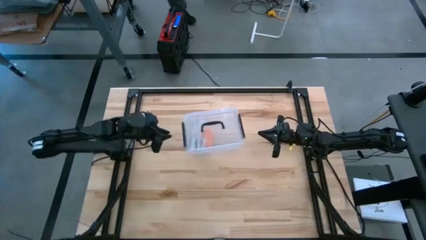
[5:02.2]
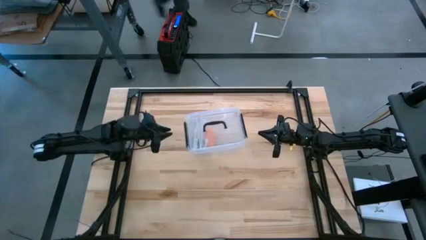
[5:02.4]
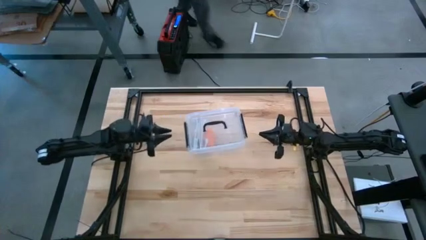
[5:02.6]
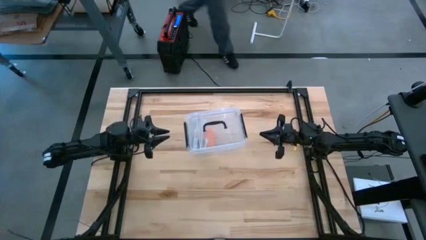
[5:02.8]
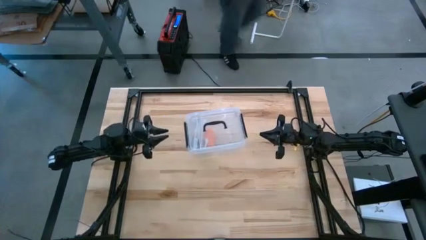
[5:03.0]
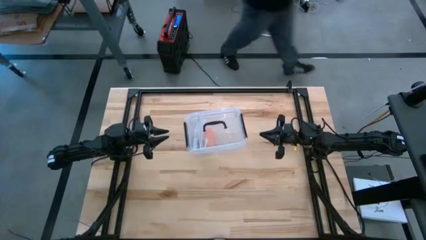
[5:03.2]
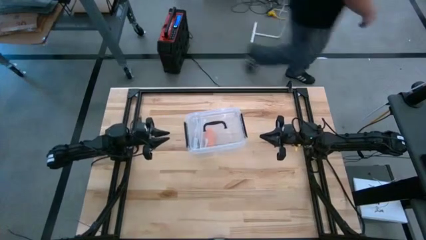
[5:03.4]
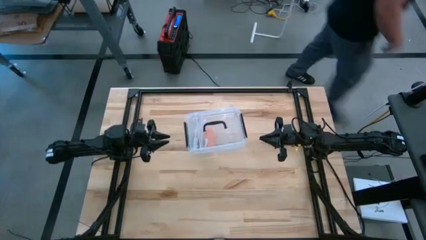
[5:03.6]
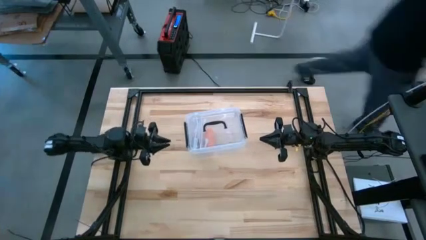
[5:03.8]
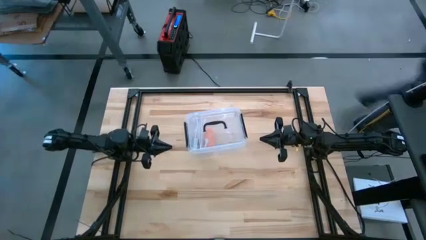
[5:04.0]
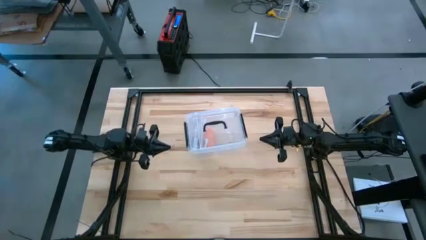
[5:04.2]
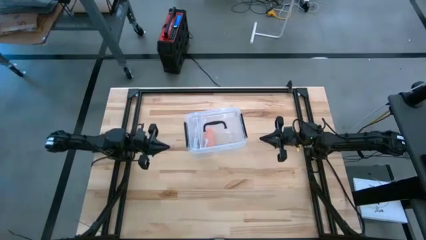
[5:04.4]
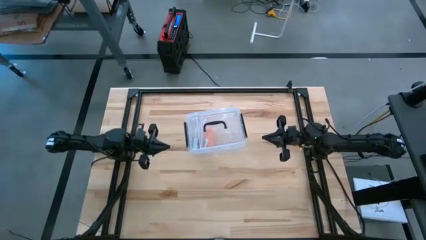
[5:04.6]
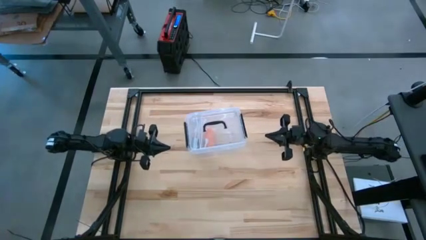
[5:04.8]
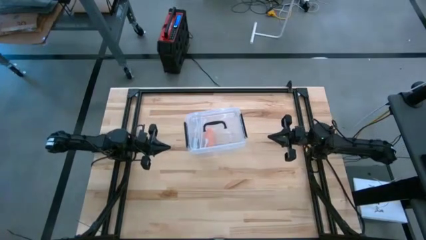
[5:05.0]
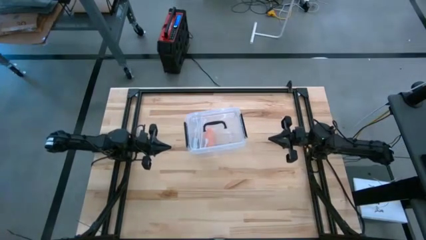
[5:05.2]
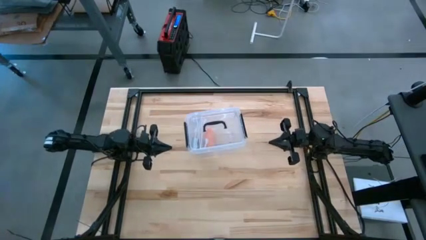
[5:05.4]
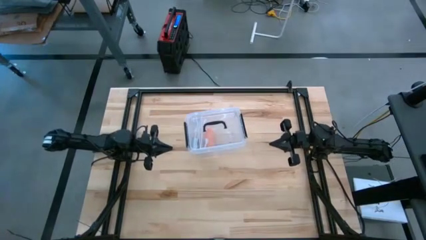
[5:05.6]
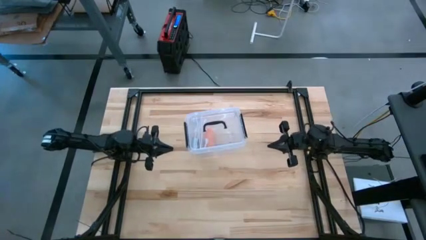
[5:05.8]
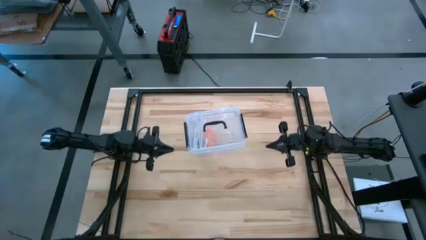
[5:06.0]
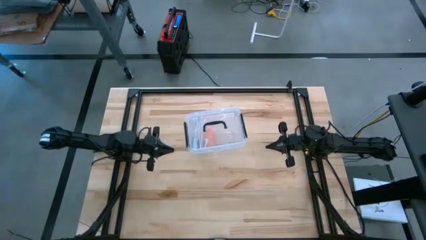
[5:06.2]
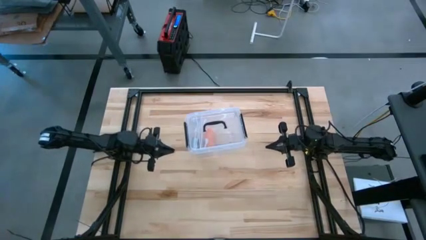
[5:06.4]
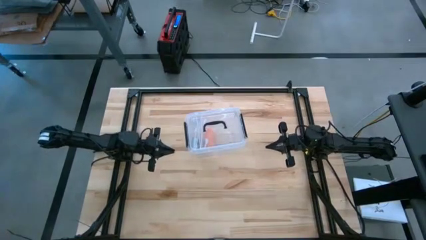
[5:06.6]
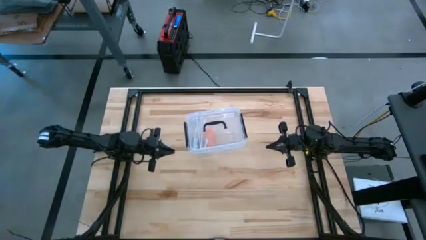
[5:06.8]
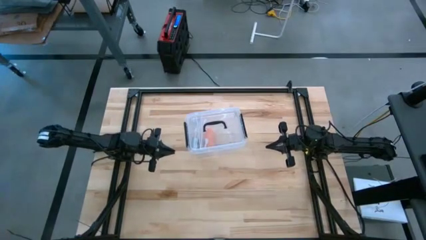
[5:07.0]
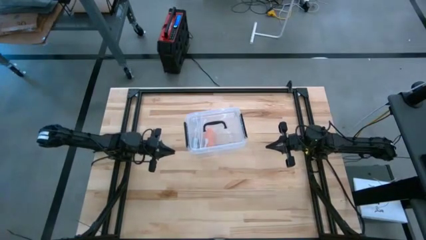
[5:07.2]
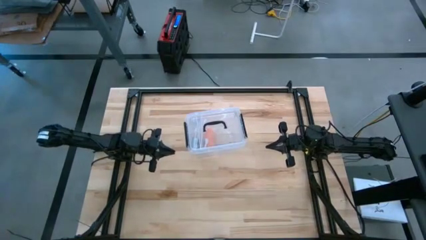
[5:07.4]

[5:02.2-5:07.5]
Task: Roll bandage
Return to Home Position
